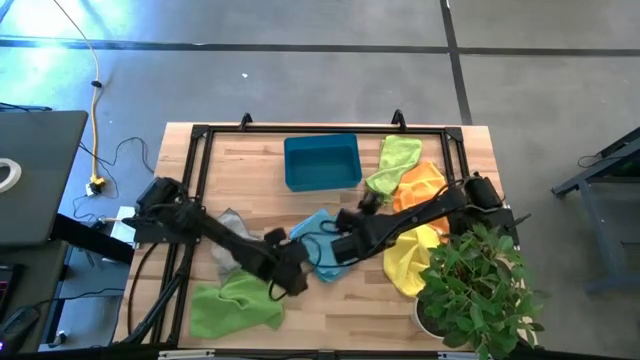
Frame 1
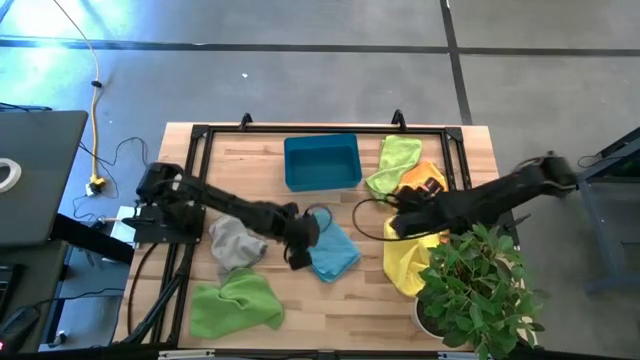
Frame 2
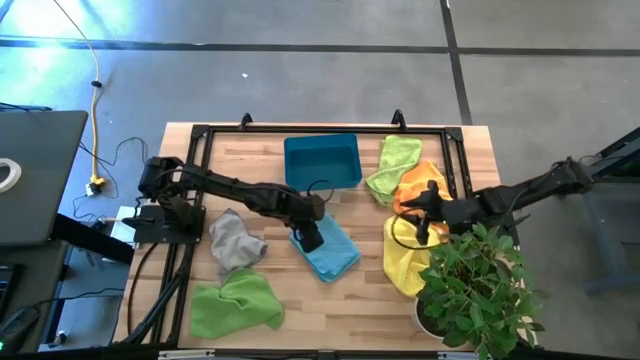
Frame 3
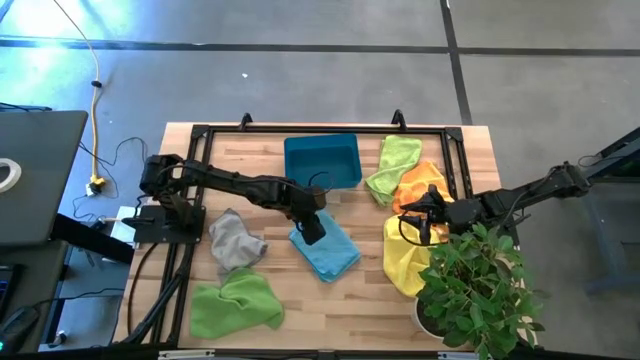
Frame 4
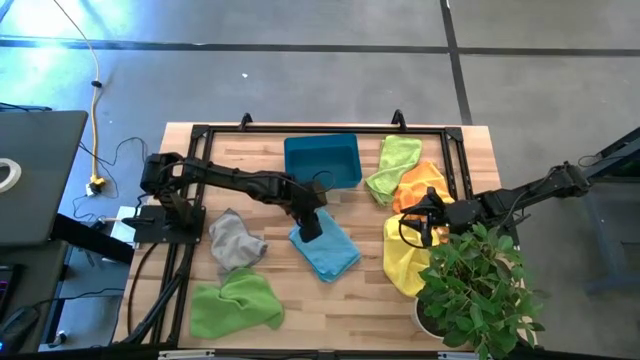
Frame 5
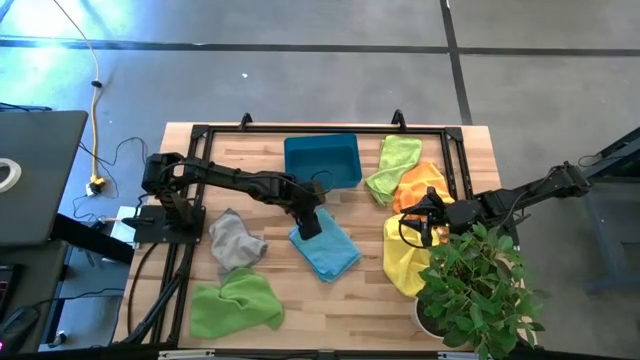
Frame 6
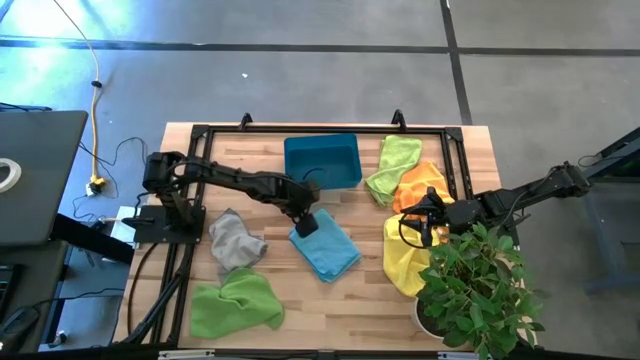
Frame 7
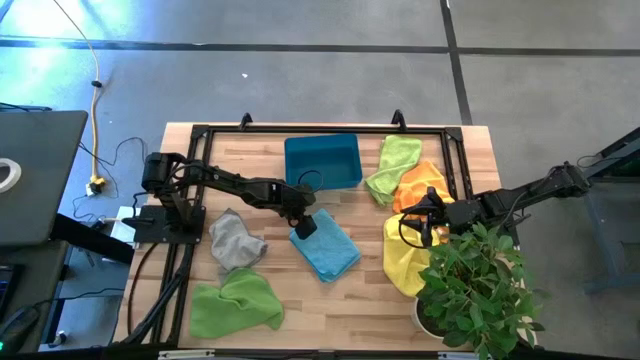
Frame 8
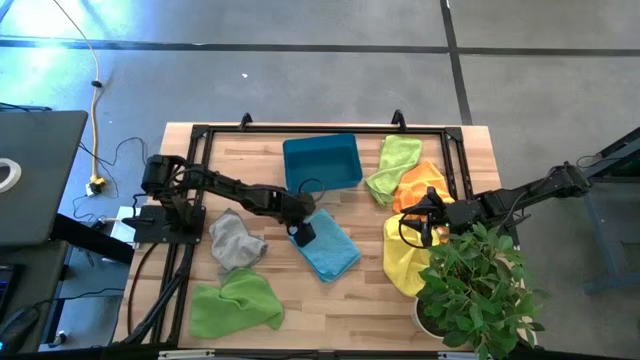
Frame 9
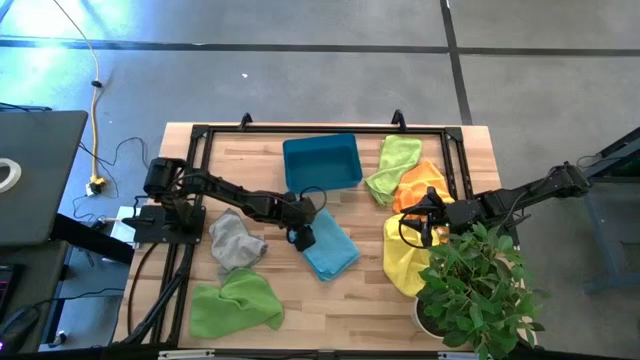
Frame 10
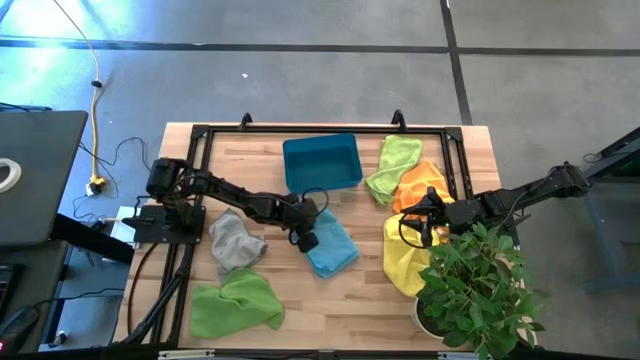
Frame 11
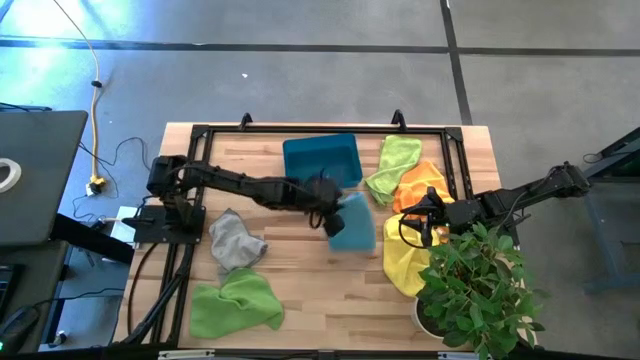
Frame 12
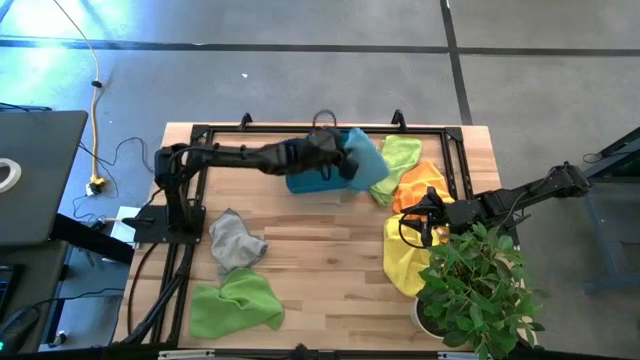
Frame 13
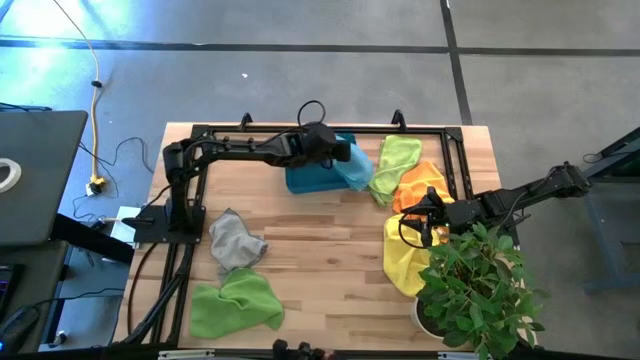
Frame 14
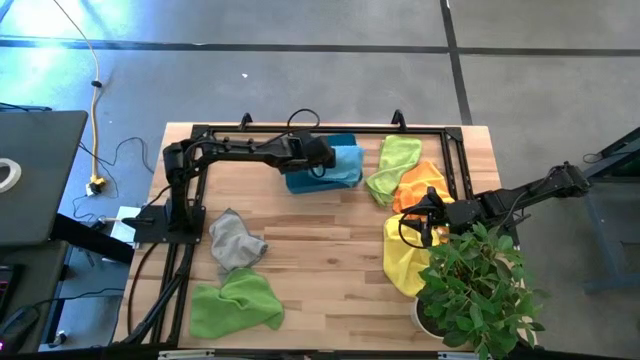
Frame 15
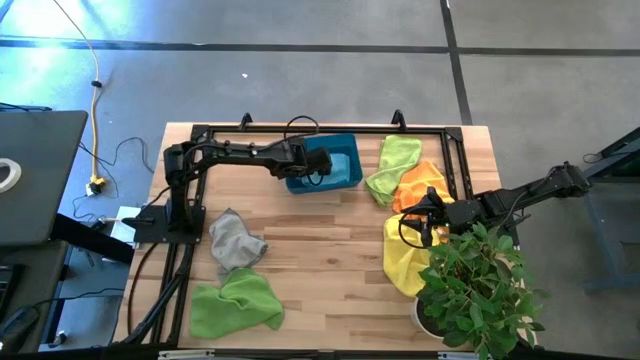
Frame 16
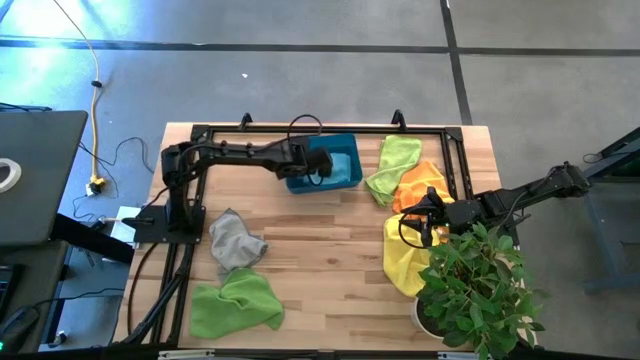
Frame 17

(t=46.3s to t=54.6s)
Task: Fold microfiber towels
Put the folded blue microfiber cloth into the blue bin

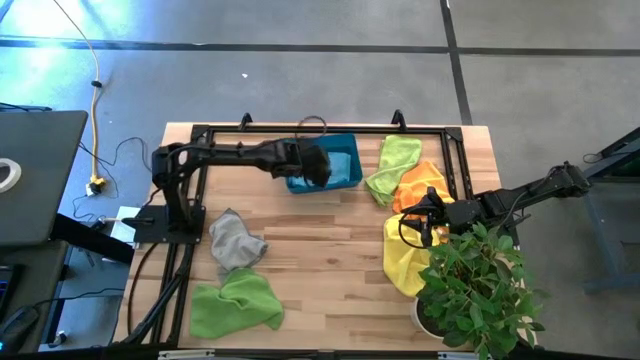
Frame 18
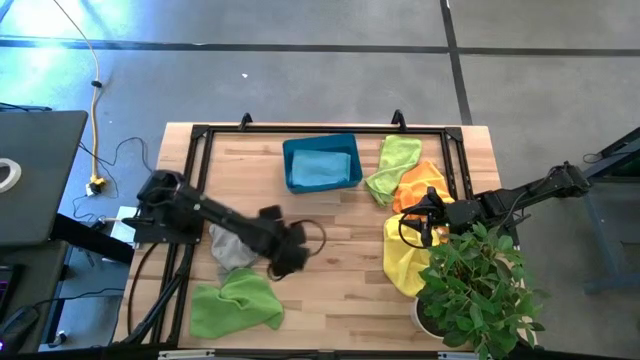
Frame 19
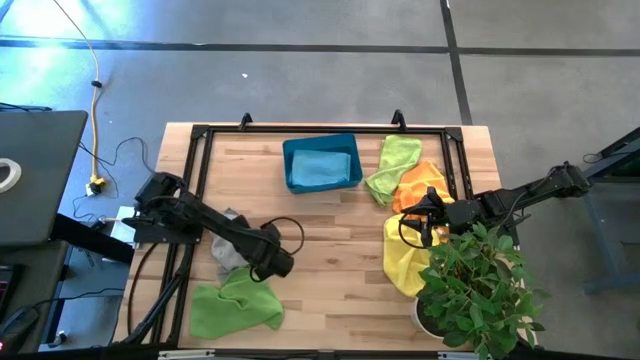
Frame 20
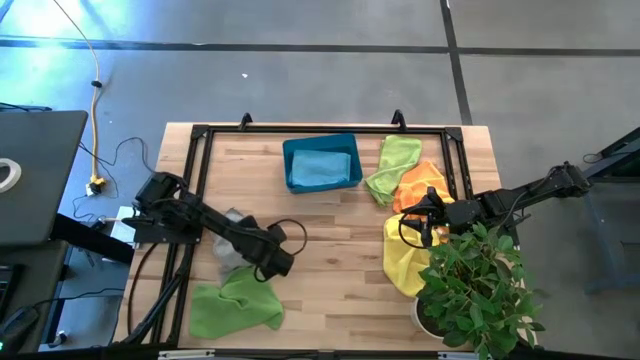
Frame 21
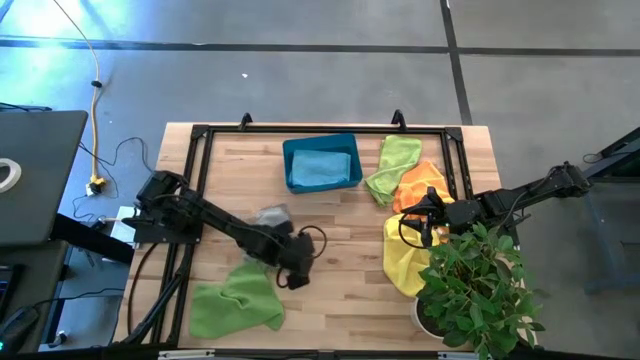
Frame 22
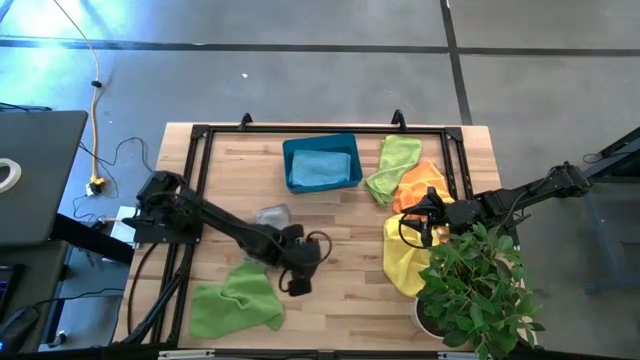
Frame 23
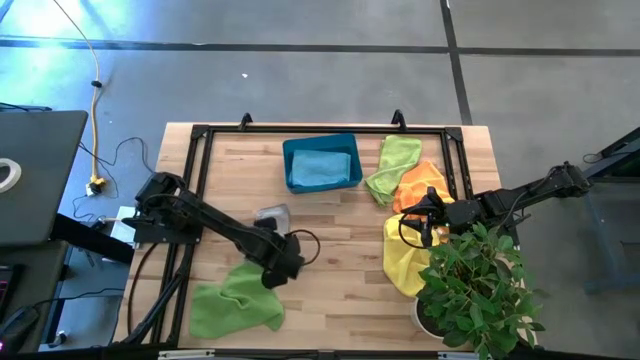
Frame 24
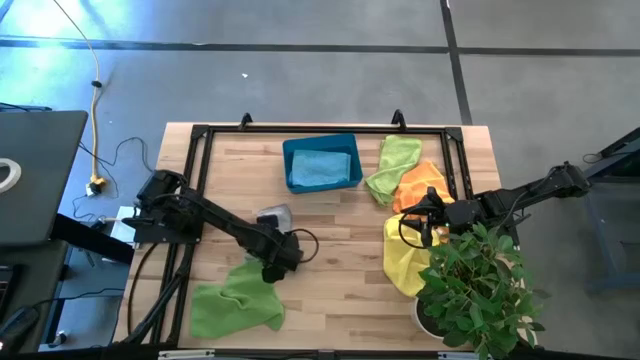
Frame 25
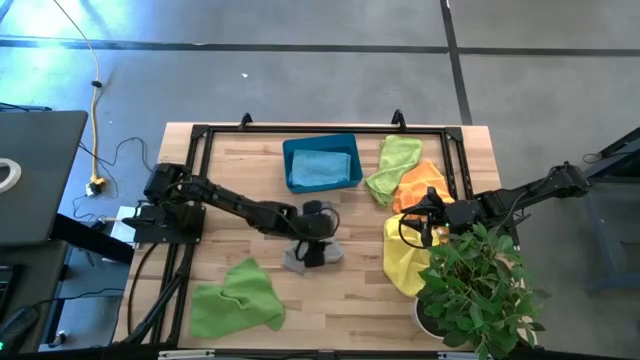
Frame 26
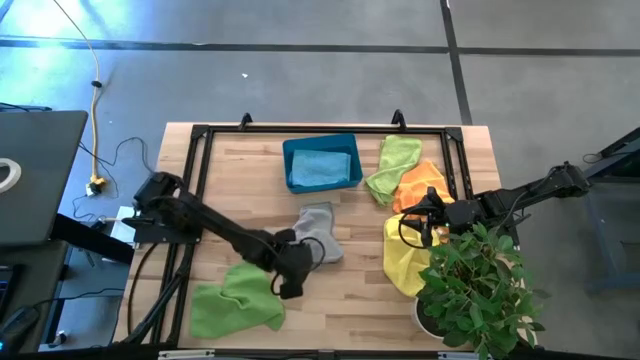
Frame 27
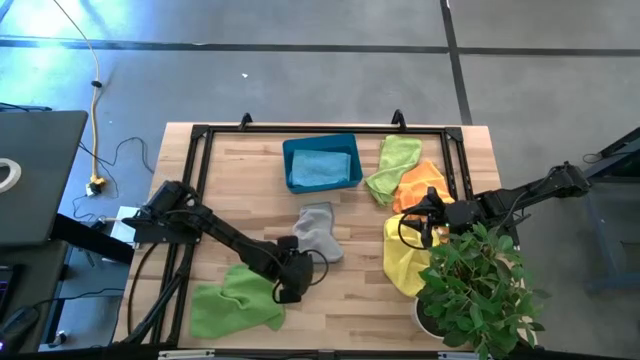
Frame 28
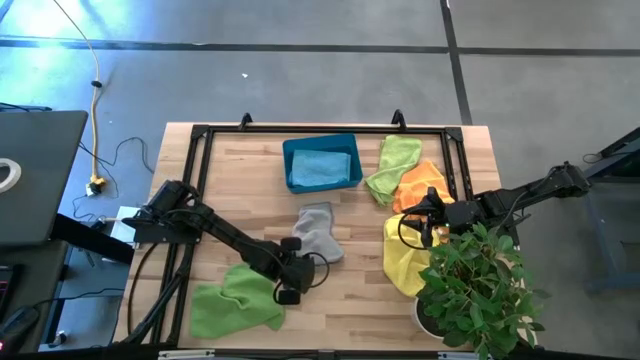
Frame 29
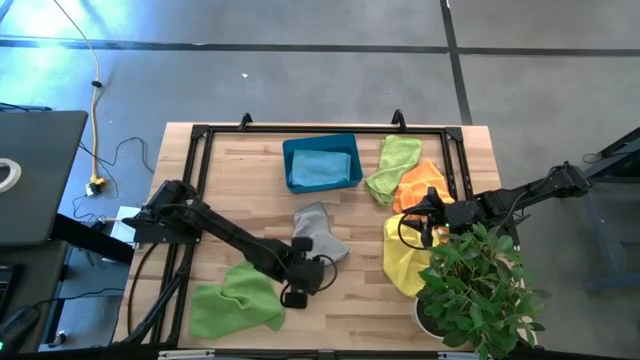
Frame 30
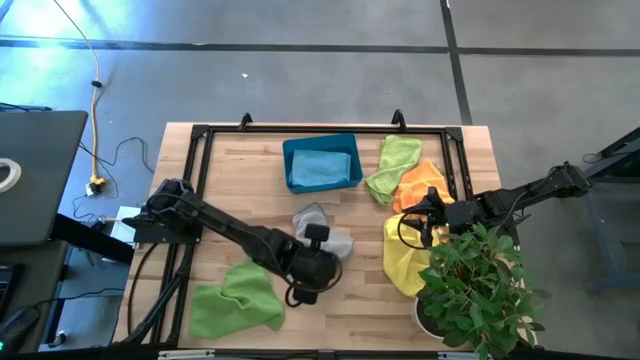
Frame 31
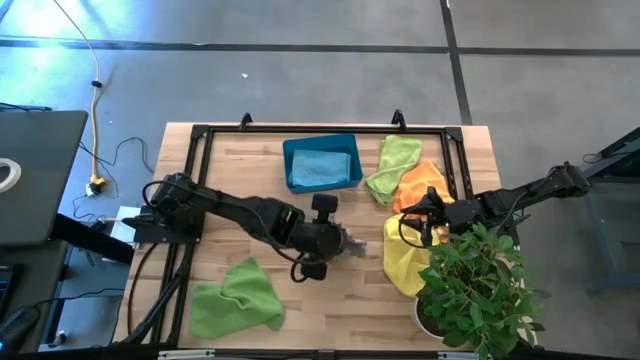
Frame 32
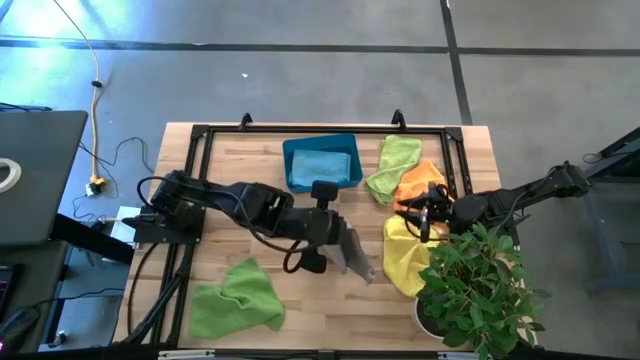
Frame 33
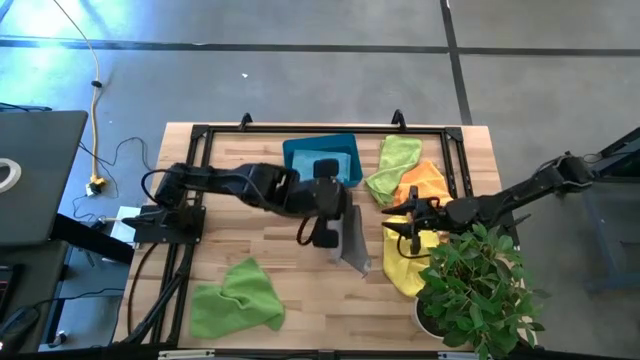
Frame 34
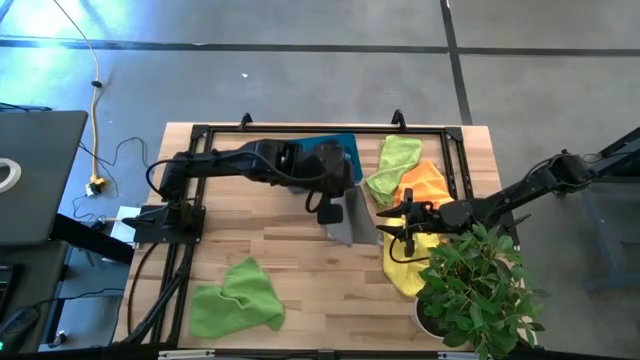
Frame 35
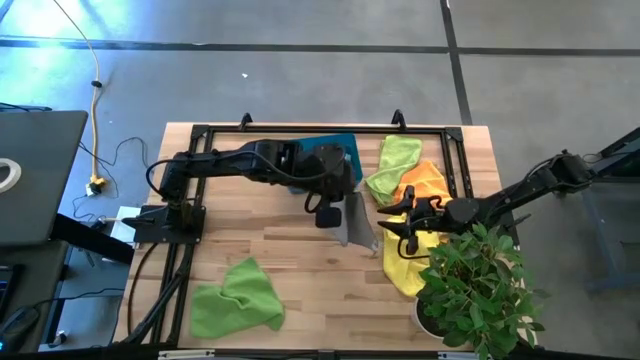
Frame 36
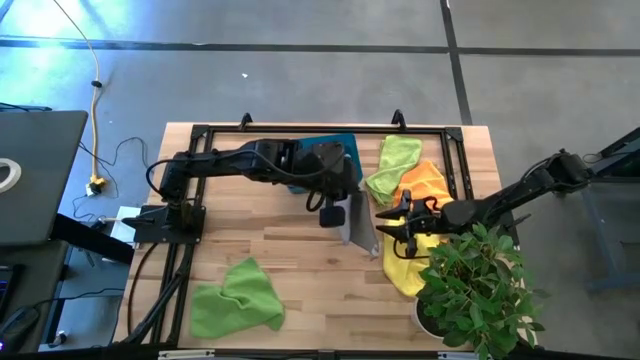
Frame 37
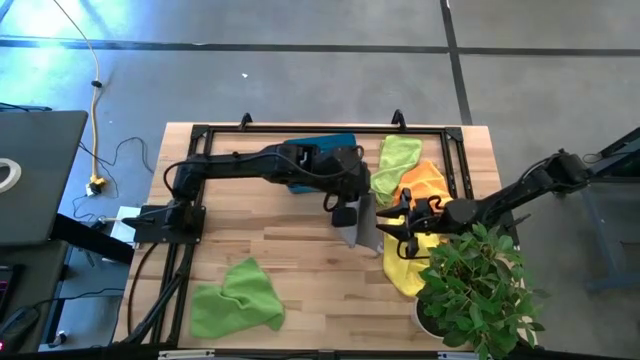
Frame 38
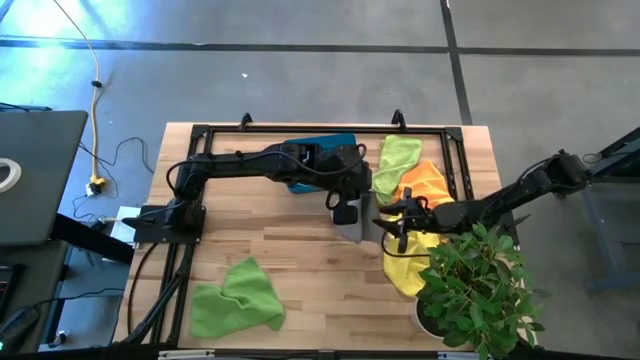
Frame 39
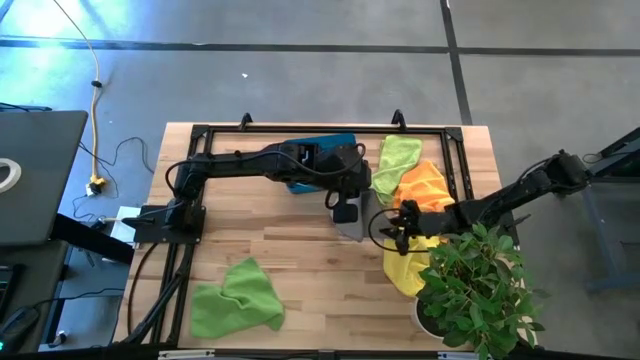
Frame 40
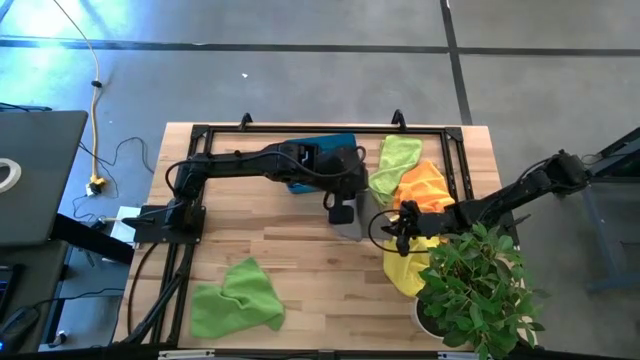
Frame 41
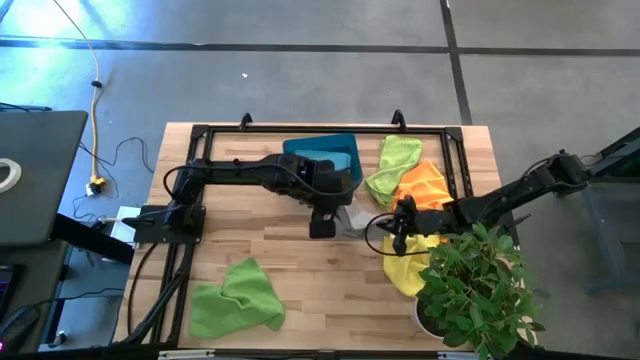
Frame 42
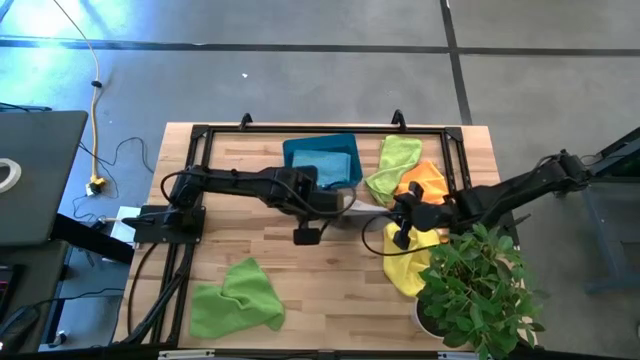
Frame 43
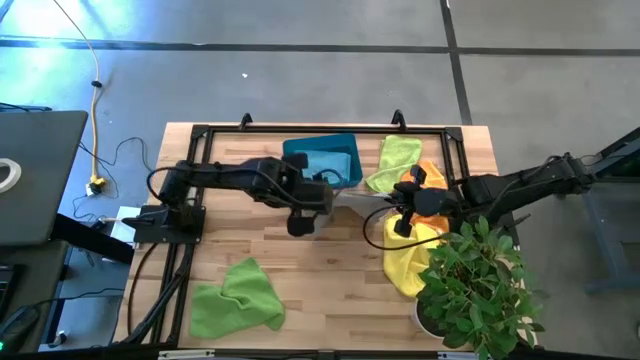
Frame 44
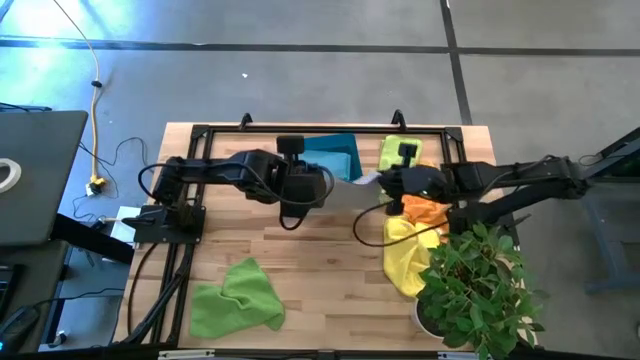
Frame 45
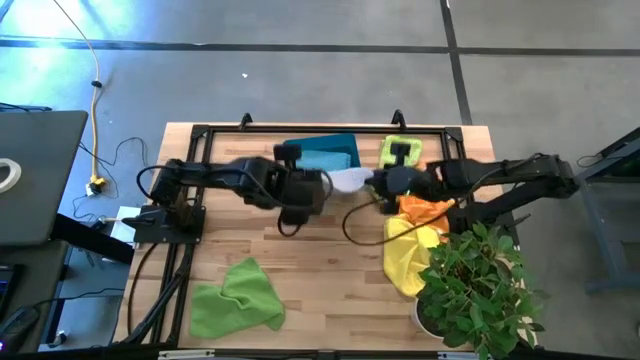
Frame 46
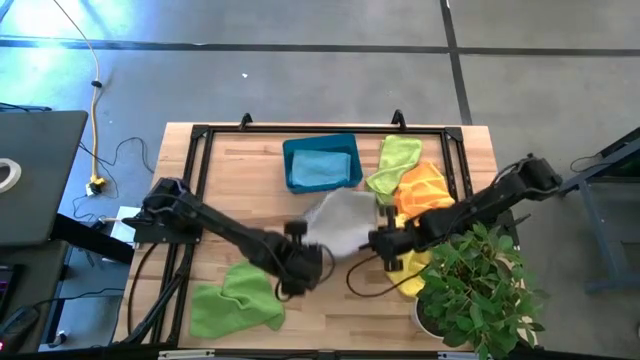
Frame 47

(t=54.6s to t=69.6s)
Fold the gray microfiber cloth
